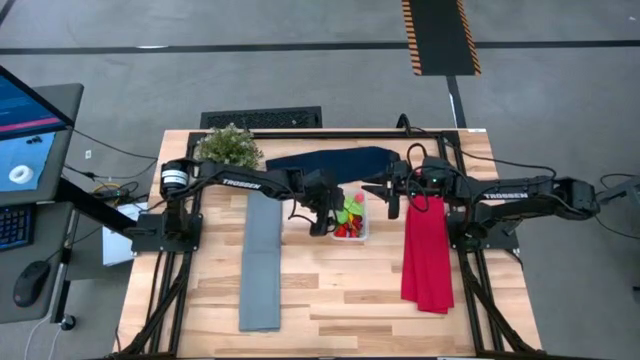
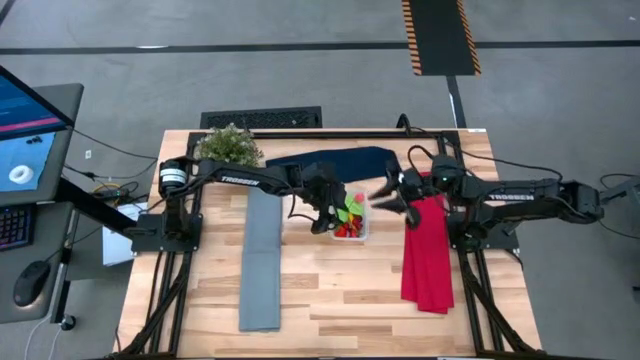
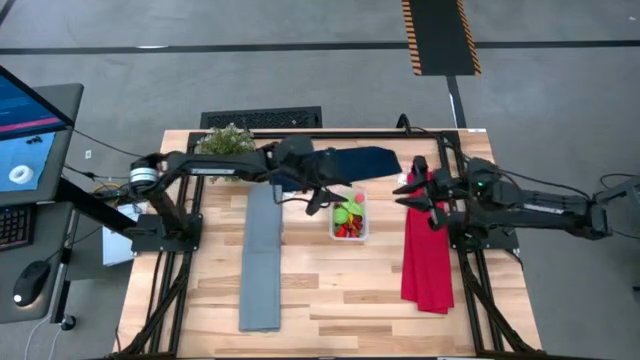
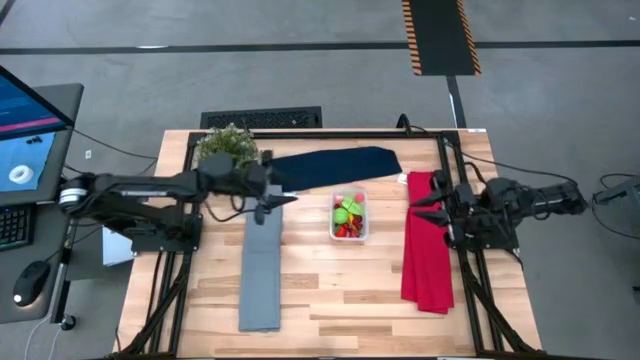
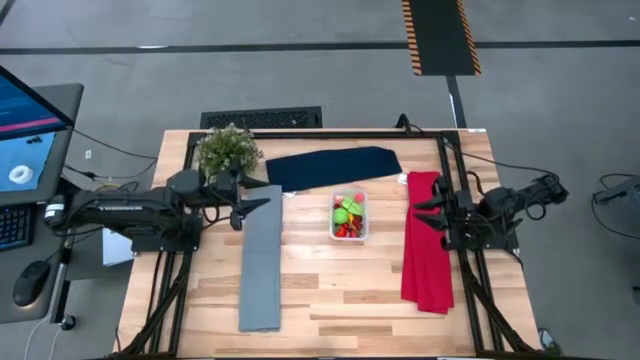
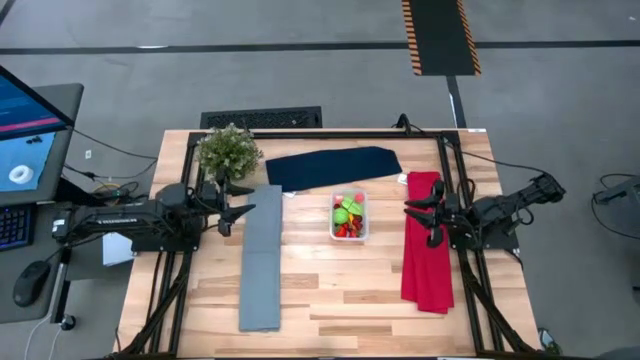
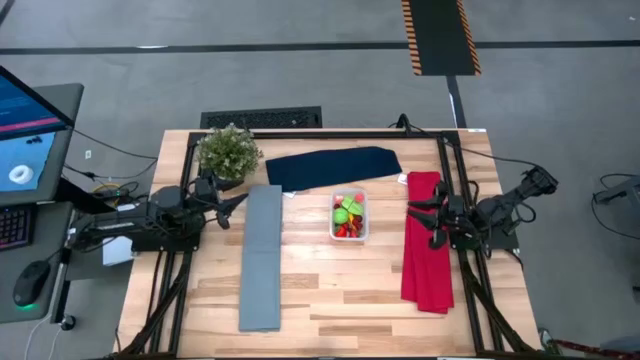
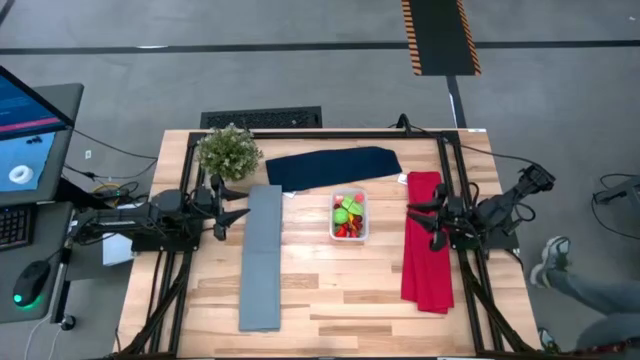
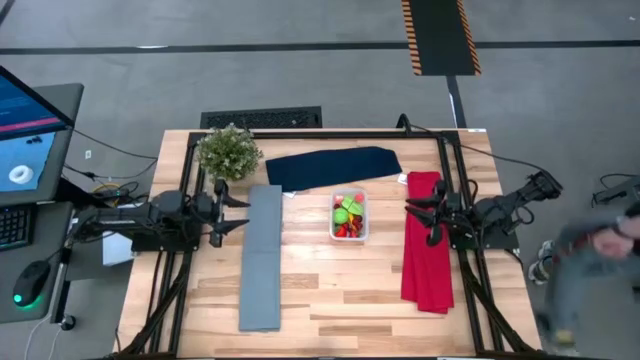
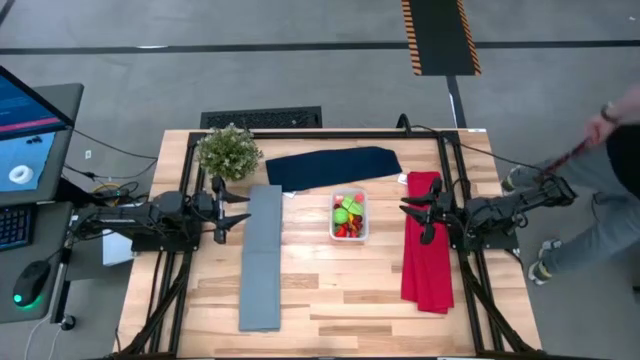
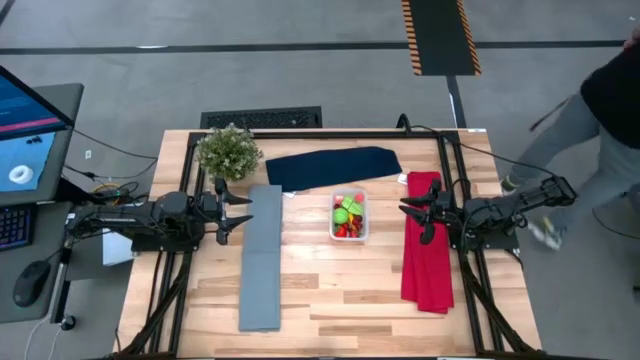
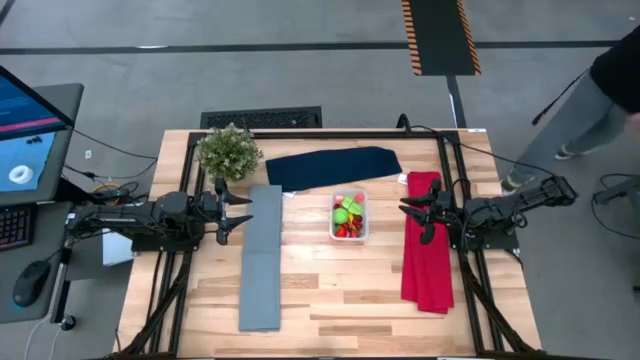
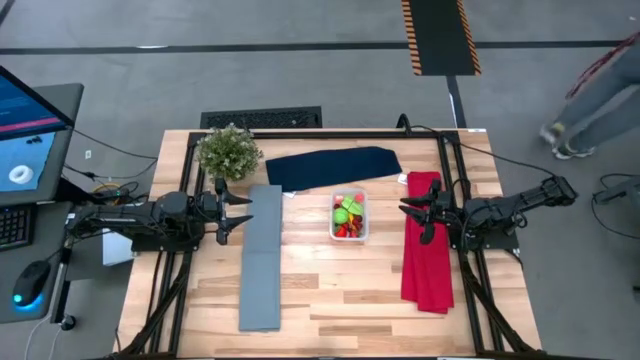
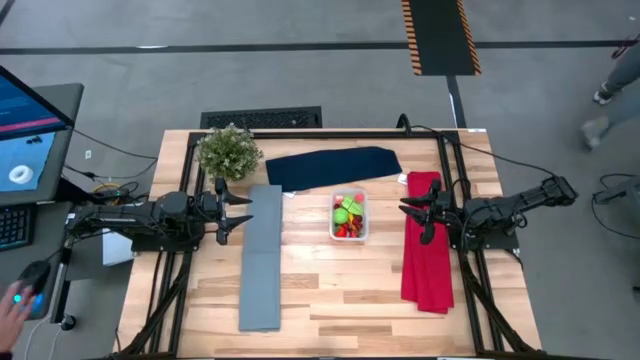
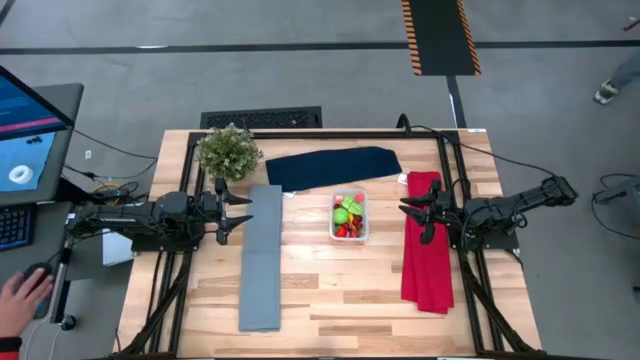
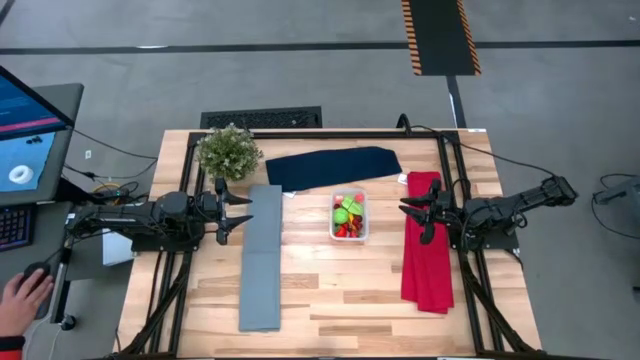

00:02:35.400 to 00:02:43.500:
Task: Pick and placing Produce into tupperware
Return to Home Position

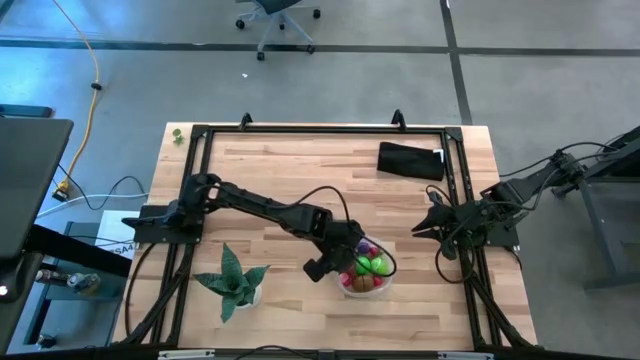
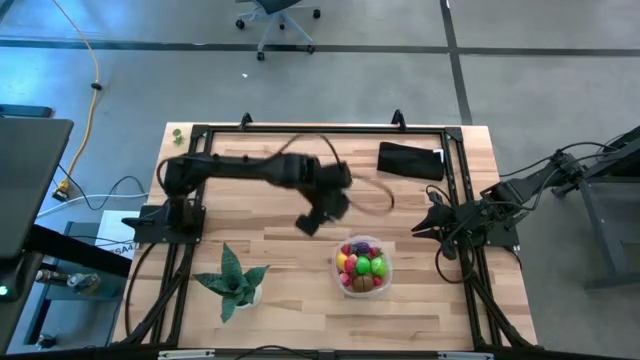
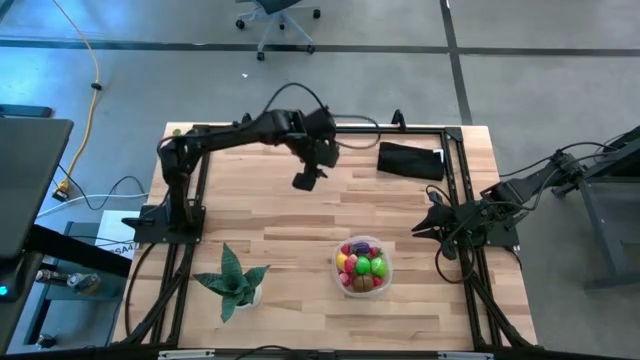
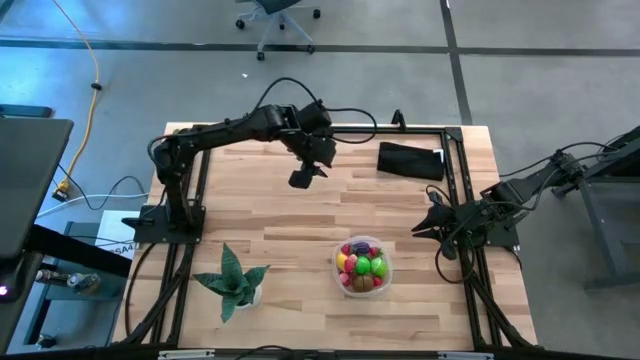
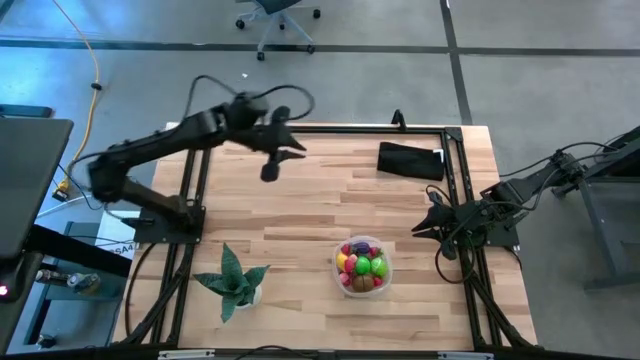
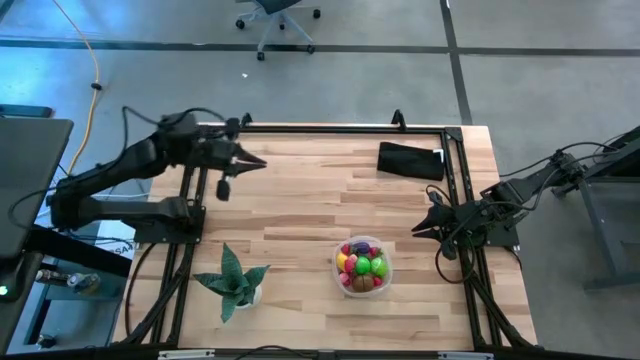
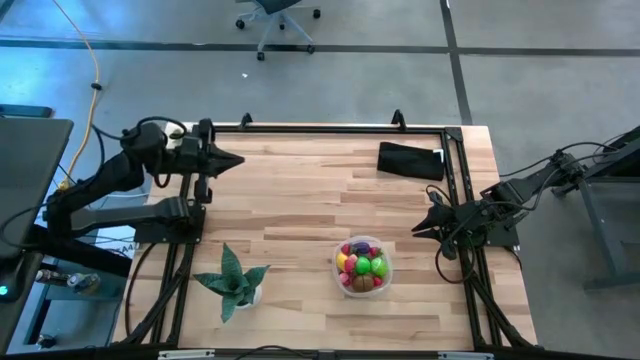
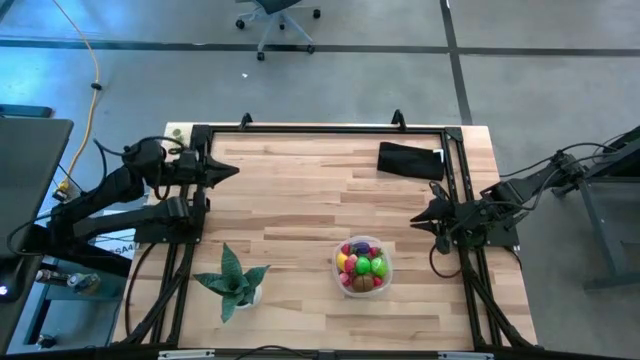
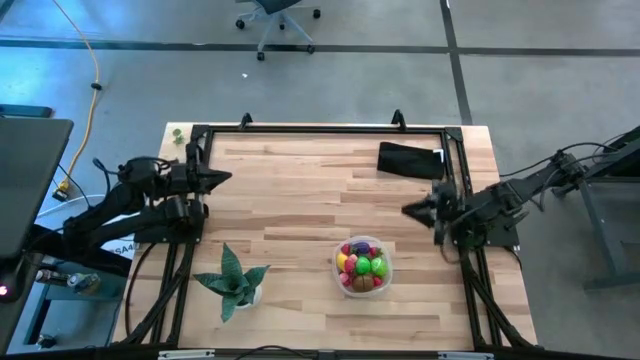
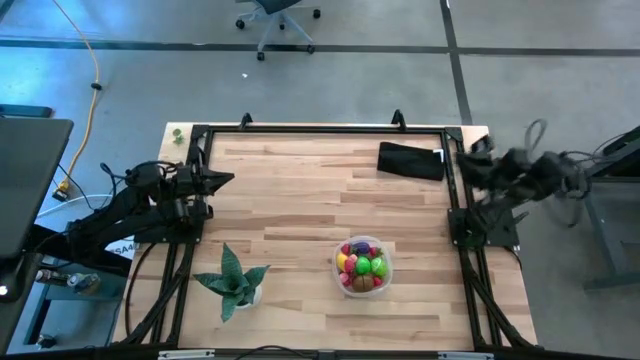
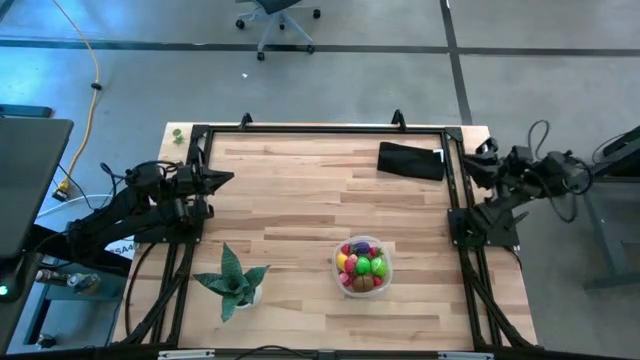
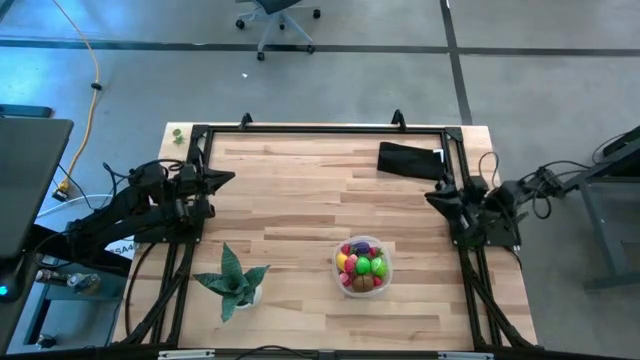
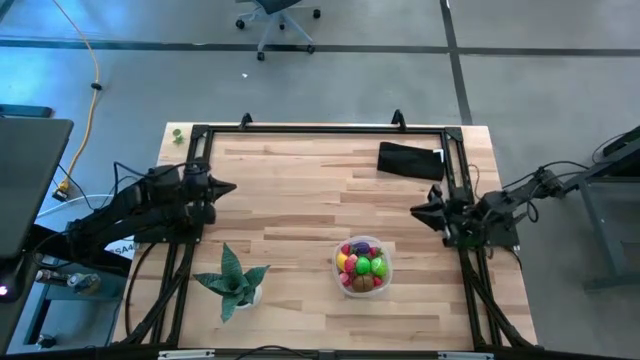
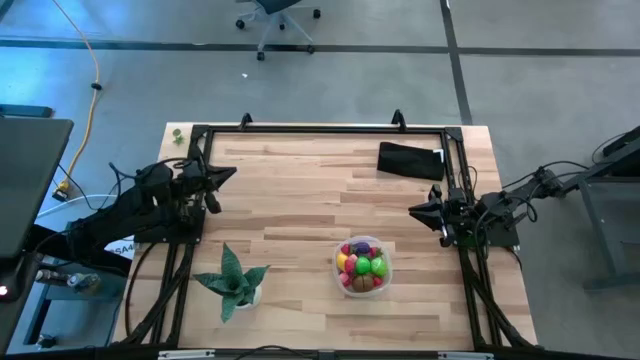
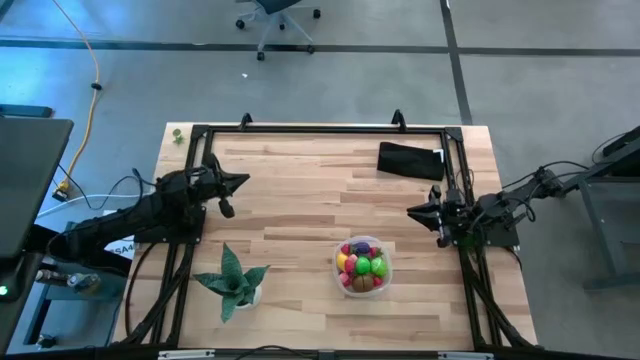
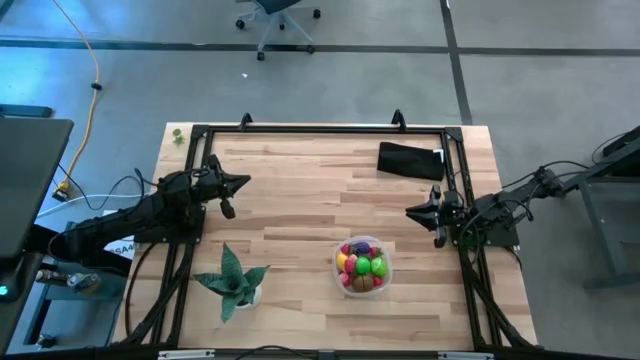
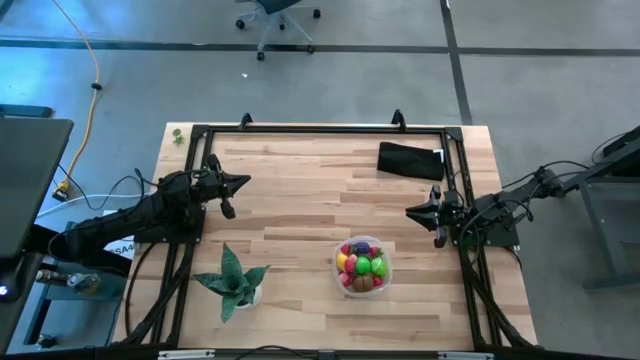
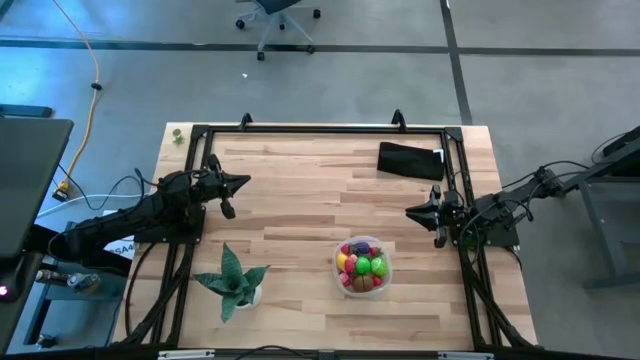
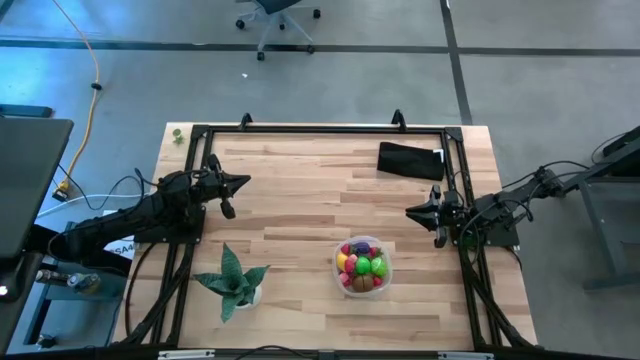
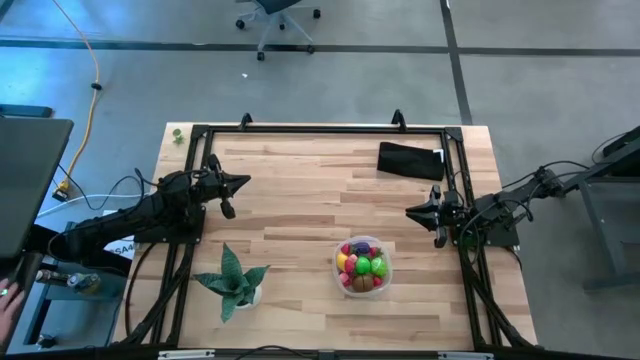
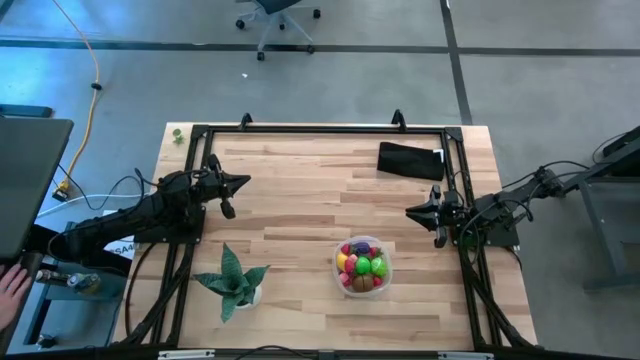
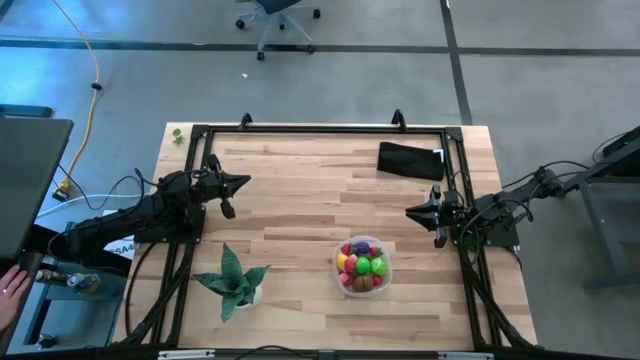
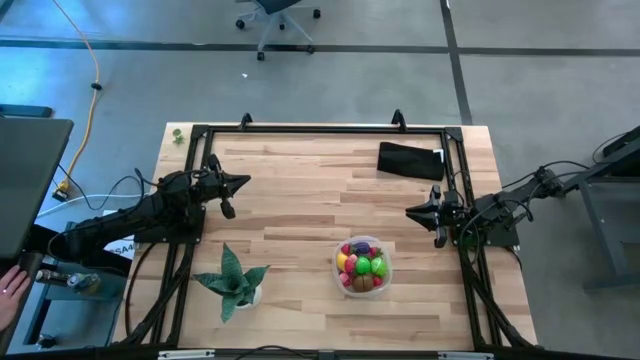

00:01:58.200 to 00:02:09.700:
Task: Pick and placing Produce into tupperware
Return to Home Position
